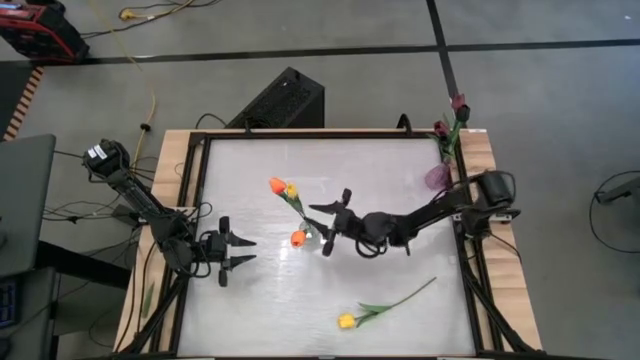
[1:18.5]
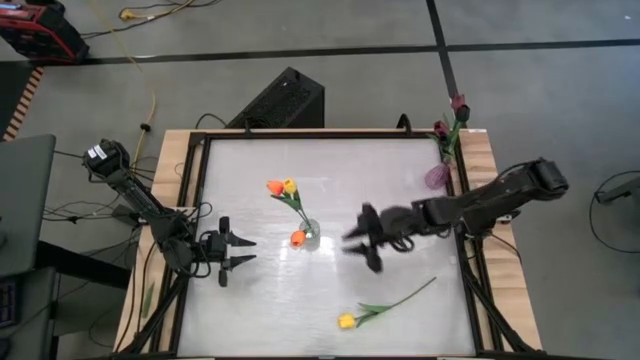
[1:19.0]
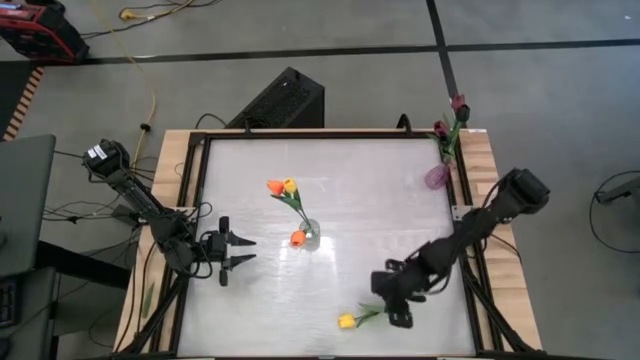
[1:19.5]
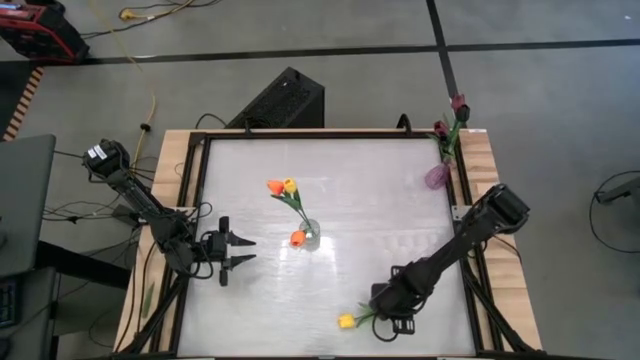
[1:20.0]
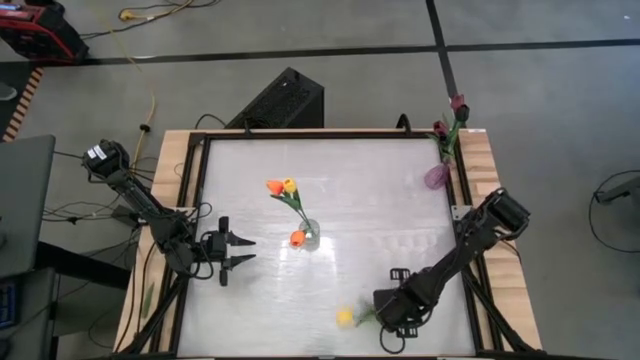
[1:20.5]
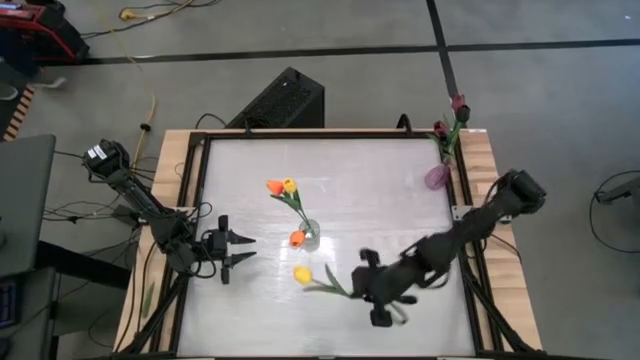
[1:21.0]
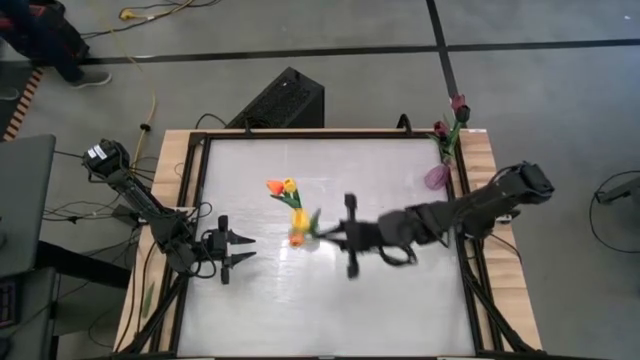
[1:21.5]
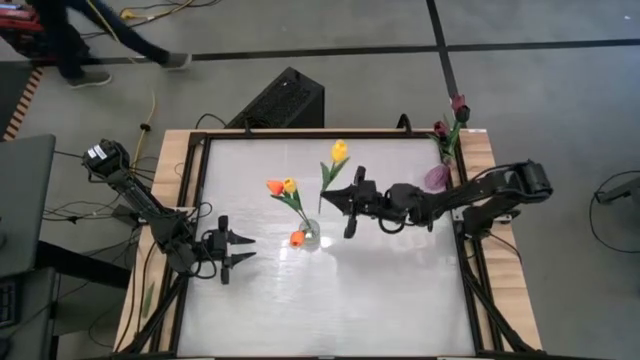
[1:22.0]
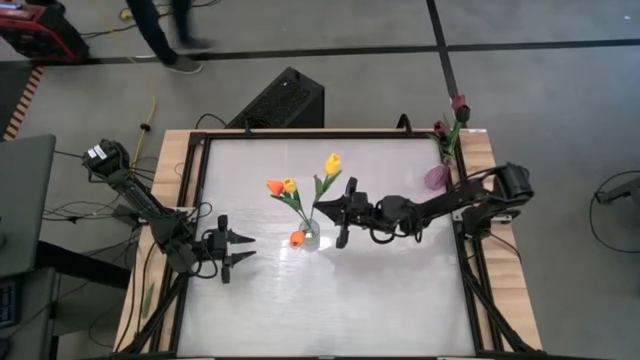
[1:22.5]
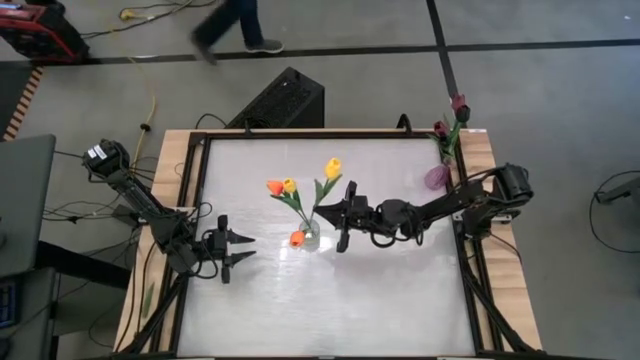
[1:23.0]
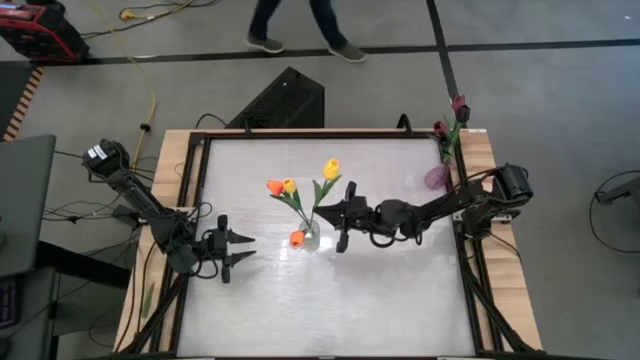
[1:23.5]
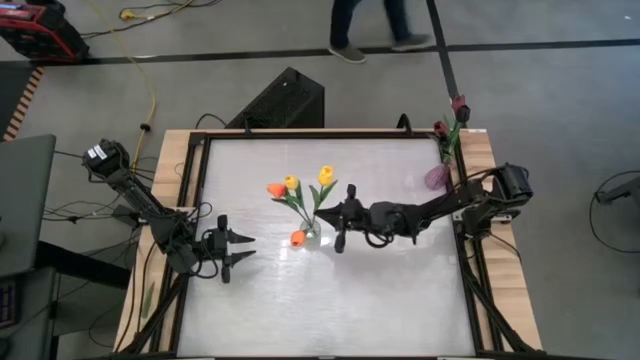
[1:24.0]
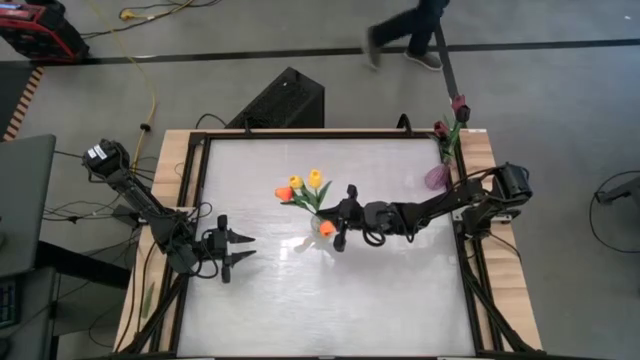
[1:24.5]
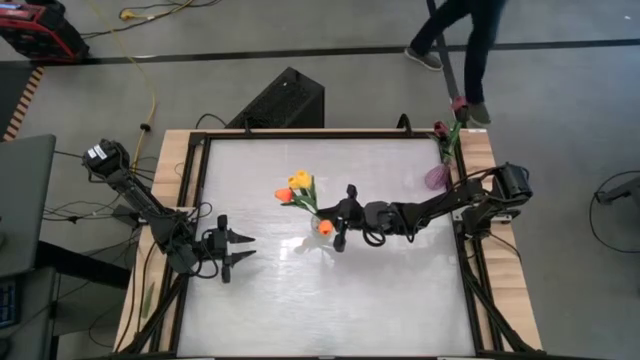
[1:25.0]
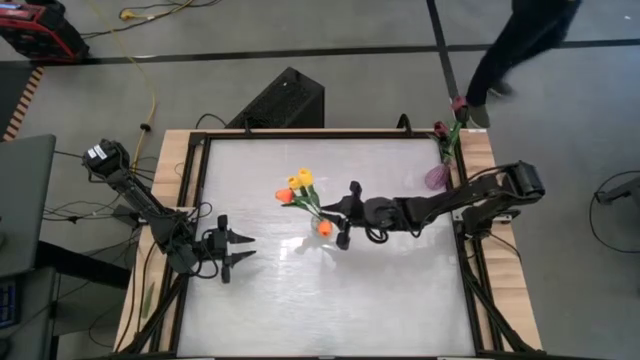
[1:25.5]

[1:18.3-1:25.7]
Task: Sort flowers into vase by color
Put the yellow flower into the transparent vase

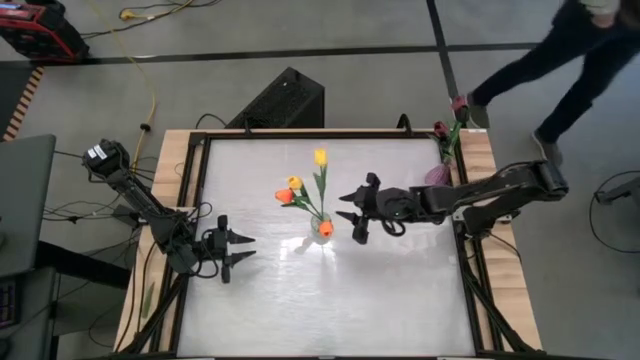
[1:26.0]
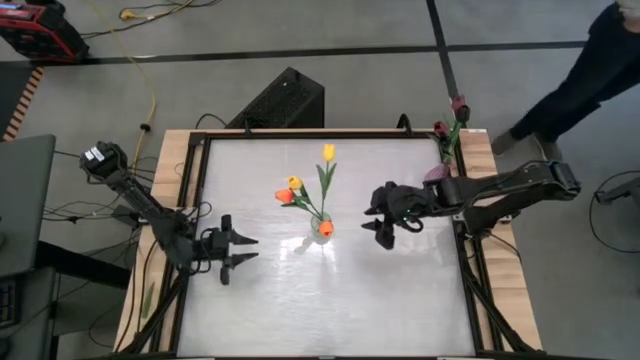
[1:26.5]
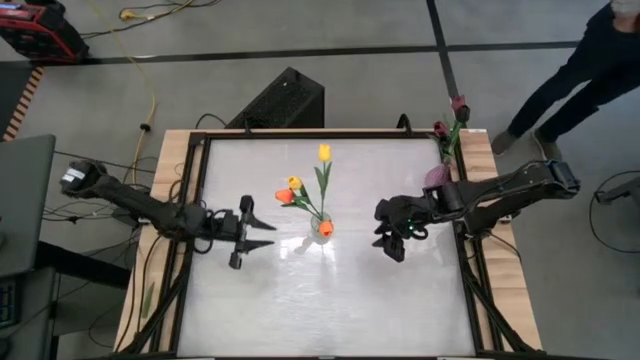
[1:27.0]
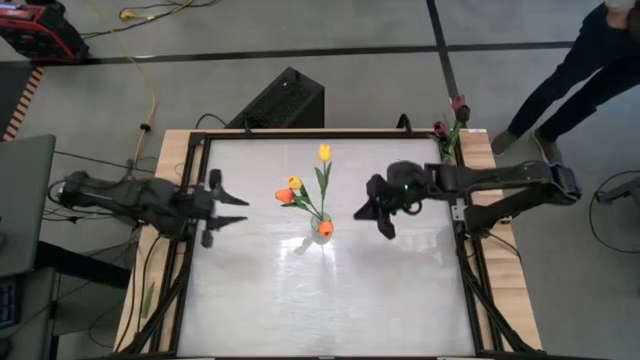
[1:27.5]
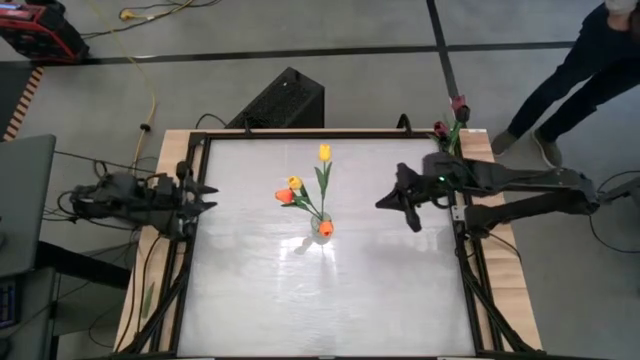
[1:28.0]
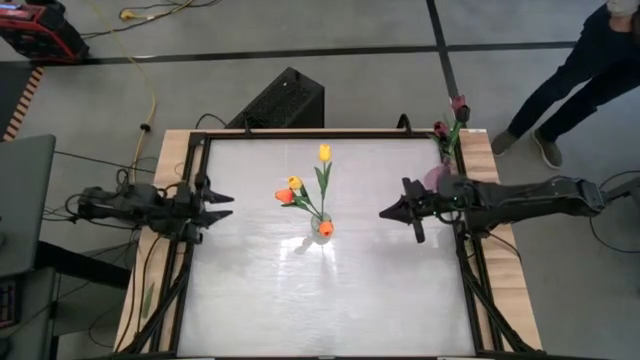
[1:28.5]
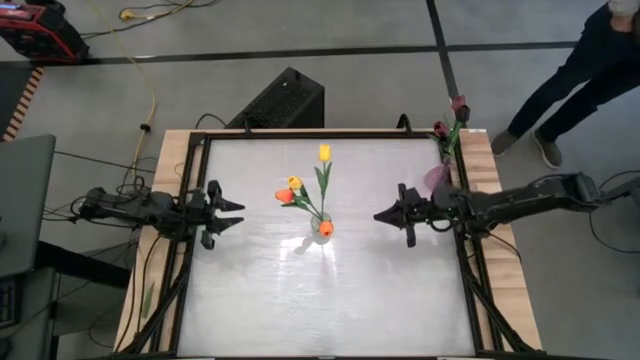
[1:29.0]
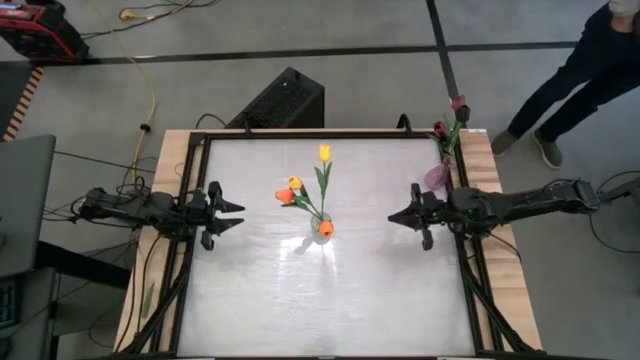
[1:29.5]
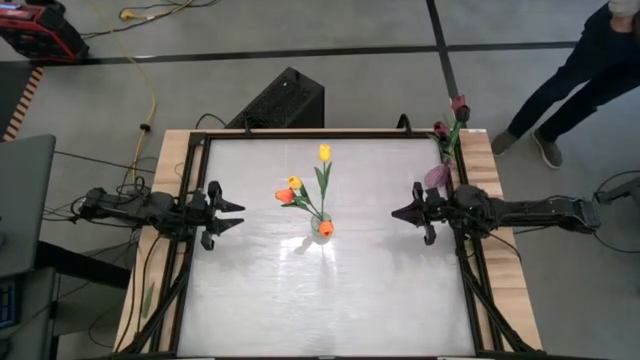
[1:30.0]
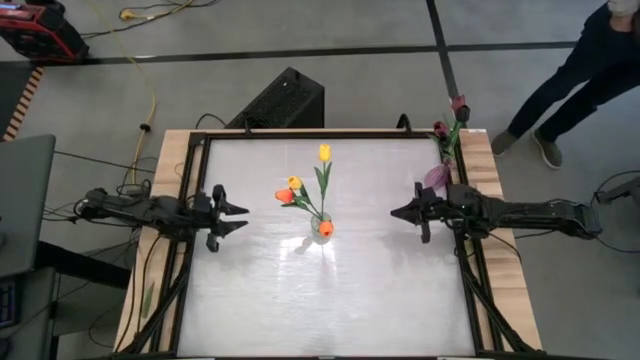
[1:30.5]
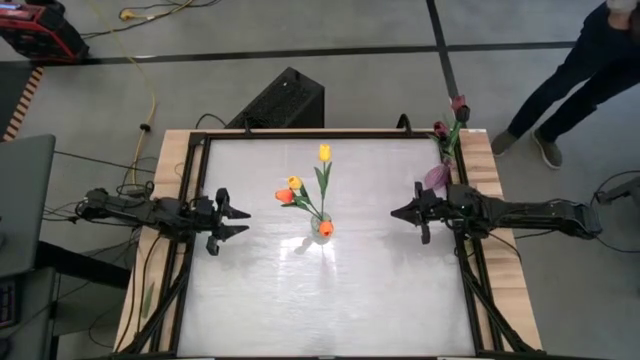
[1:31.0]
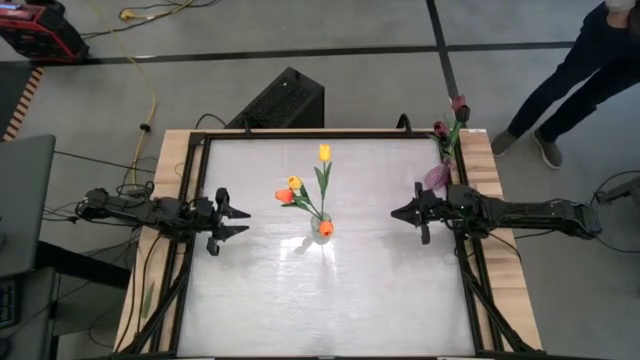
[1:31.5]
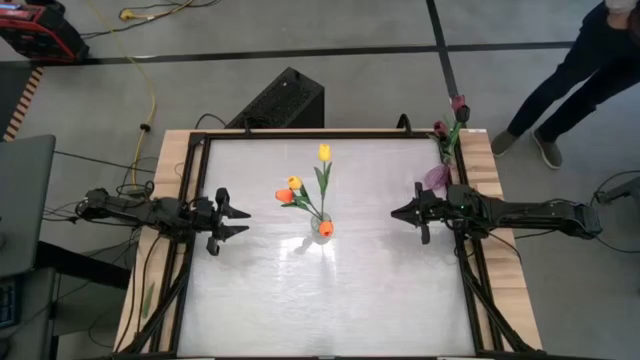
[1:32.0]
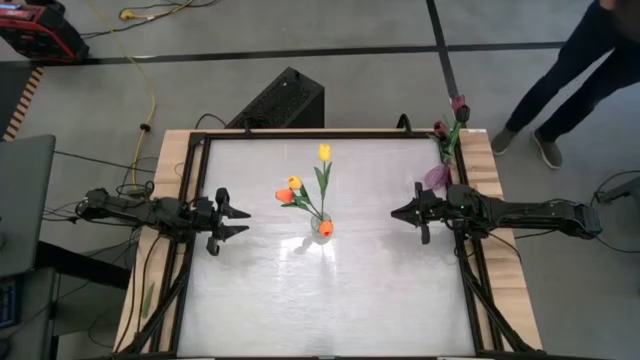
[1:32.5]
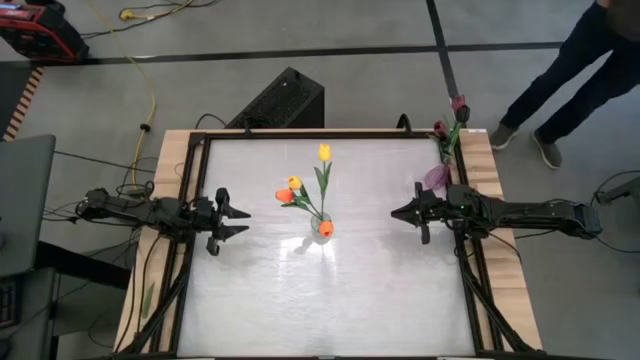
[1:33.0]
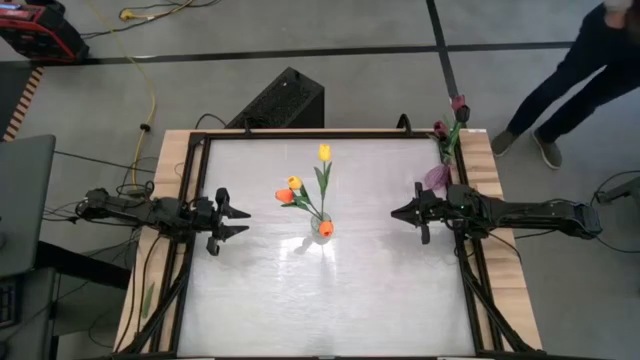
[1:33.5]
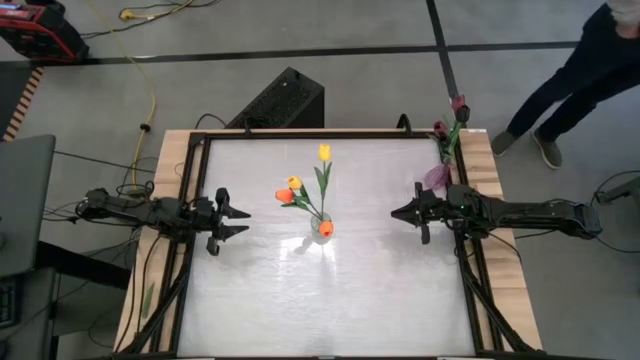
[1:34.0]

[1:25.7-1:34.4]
Return to Home Position

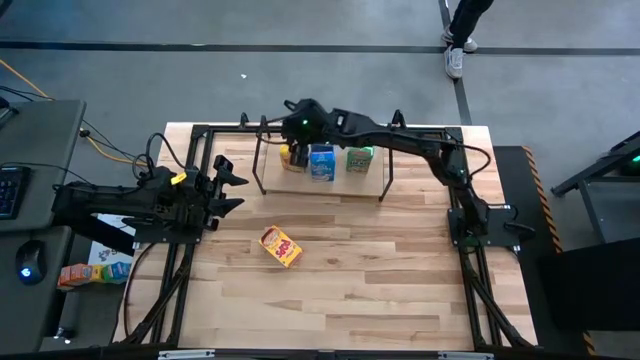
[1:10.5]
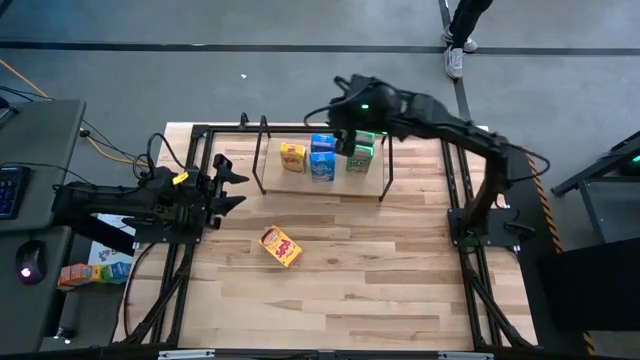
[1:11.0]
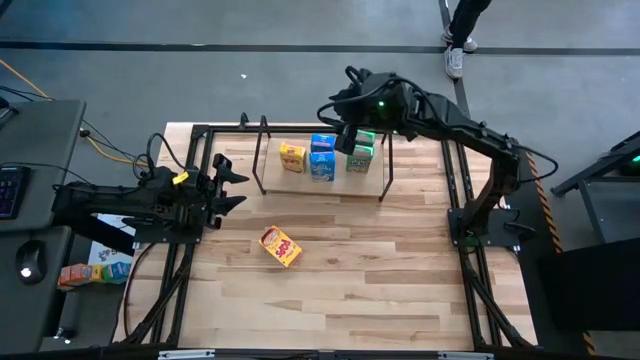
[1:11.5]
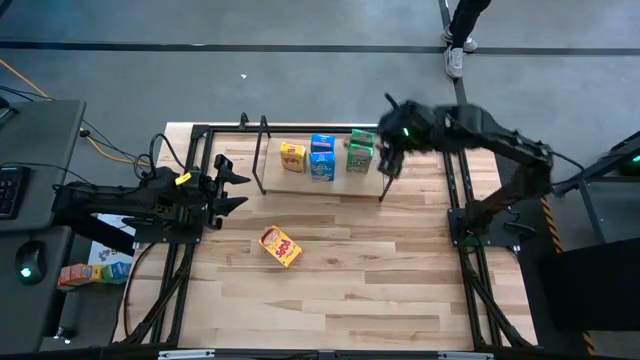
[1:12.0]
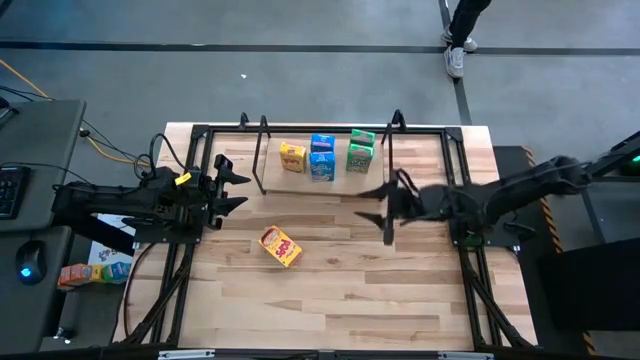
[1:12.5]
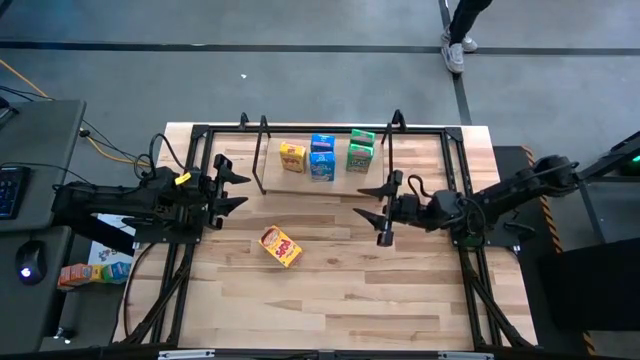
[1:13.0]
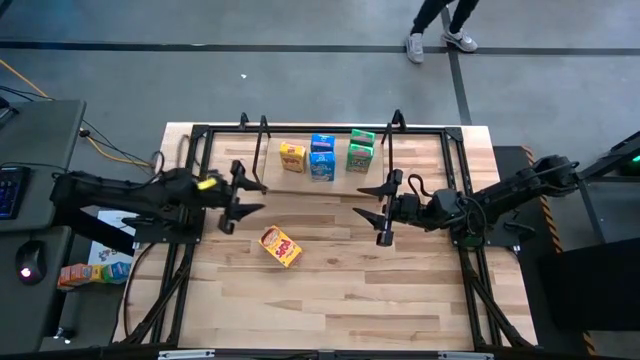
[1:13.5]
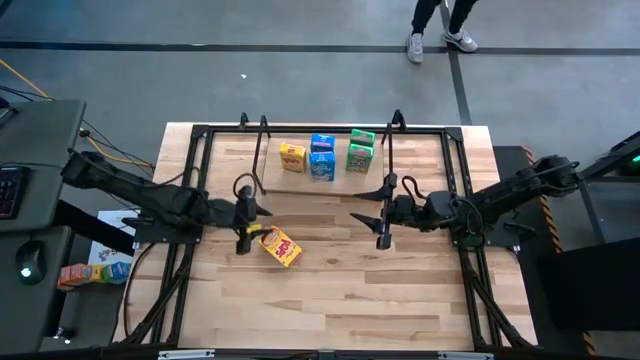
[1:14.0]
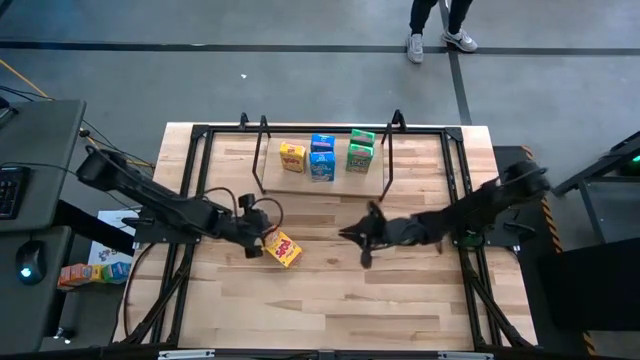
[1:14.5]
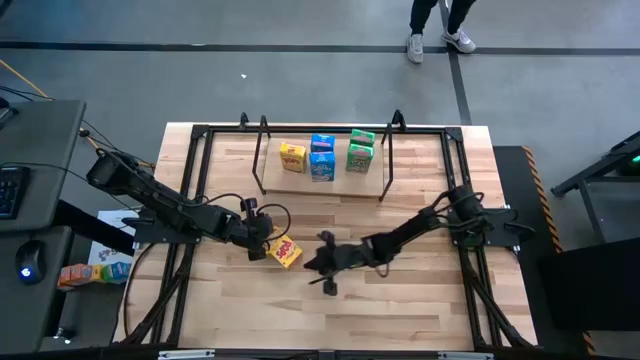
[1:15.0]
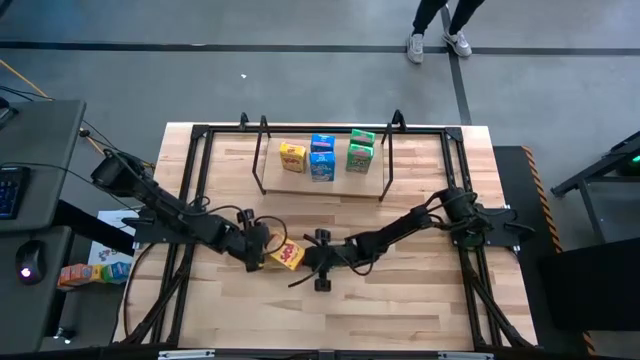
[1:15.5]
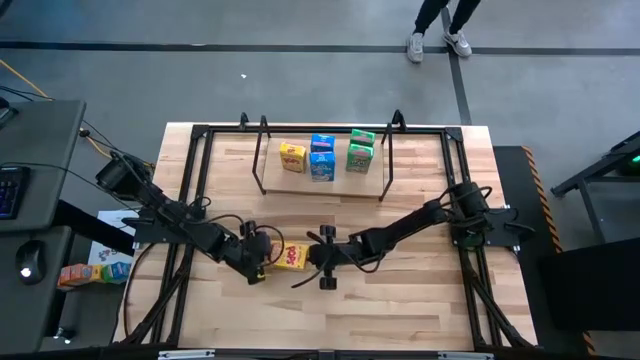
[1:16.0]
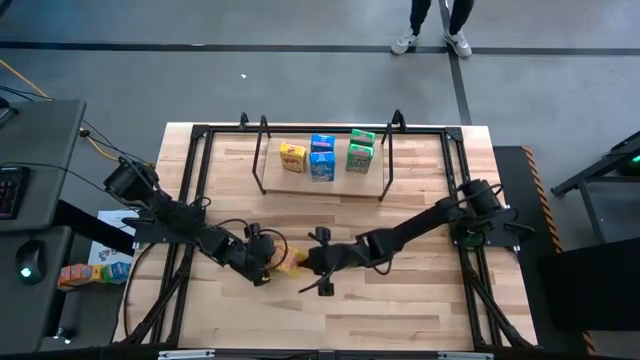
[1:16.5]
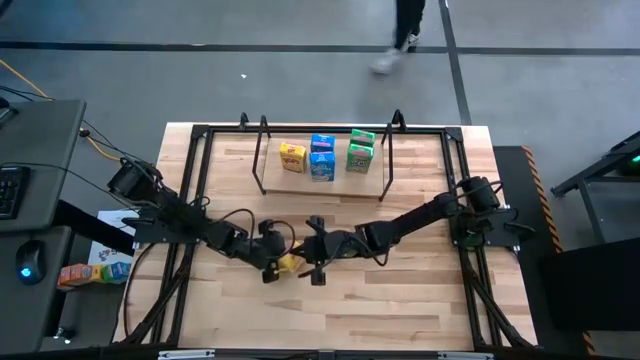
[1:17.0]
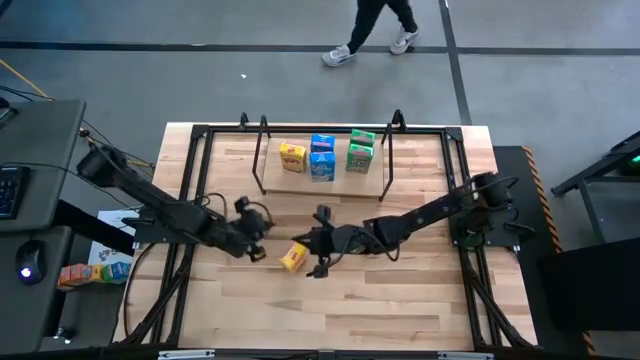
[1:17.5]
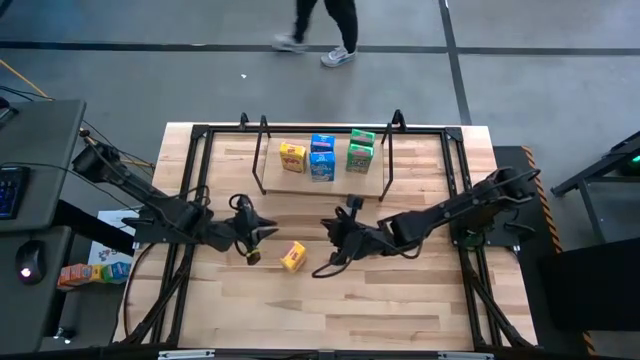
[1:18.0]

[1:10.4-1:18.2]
Task: Stack cereal on shelf
Prepare the yellow cereal box on the table
